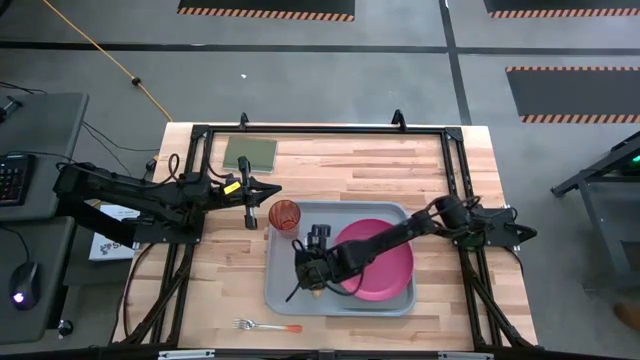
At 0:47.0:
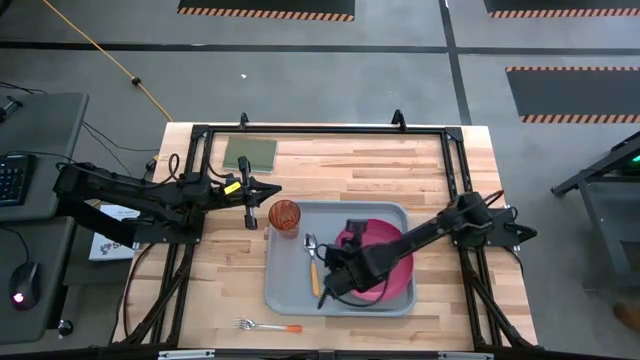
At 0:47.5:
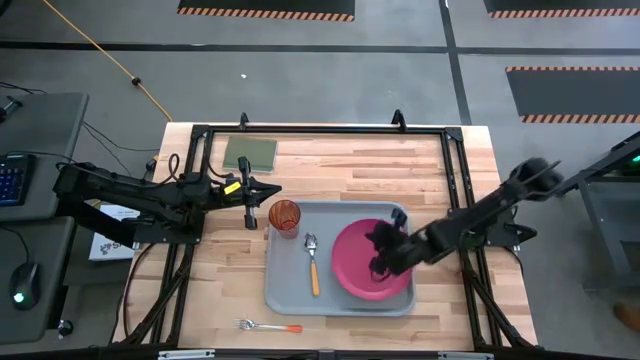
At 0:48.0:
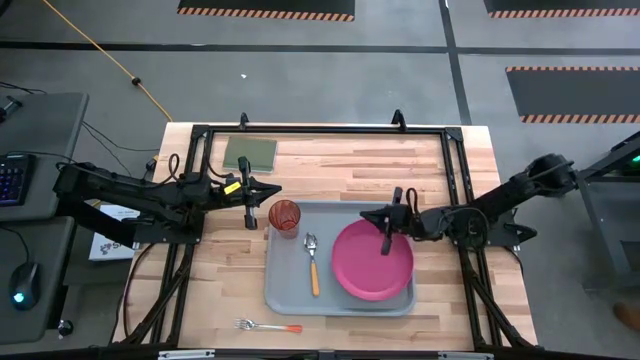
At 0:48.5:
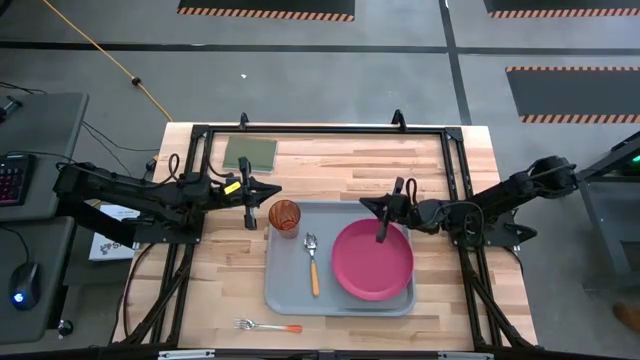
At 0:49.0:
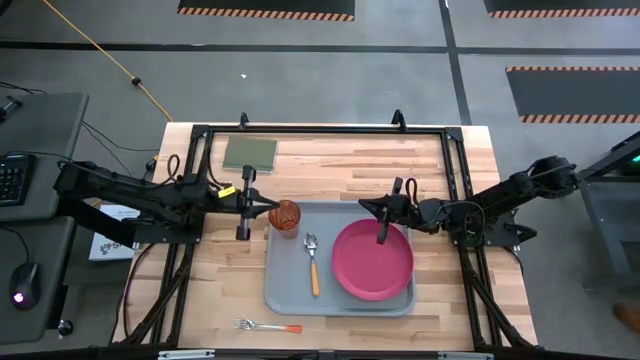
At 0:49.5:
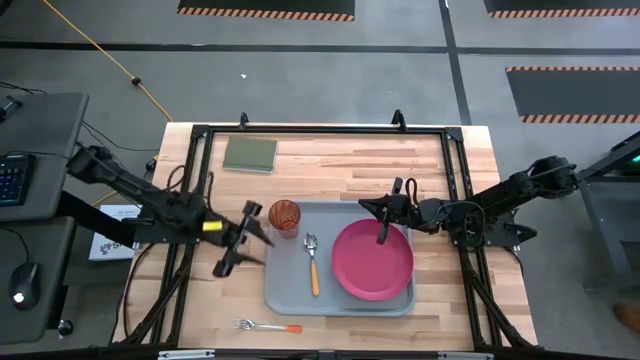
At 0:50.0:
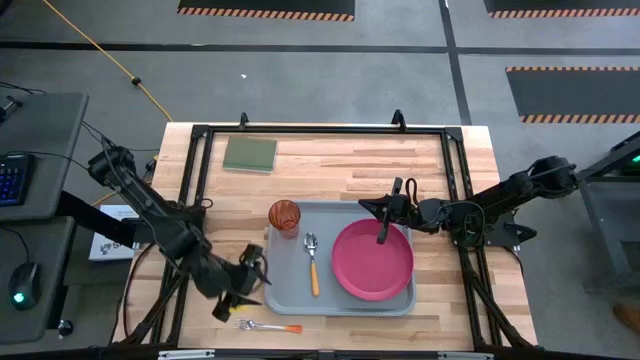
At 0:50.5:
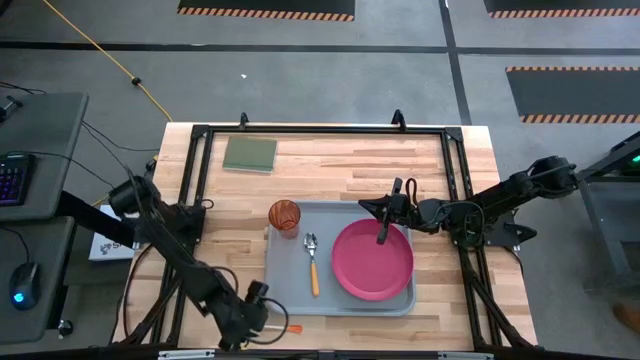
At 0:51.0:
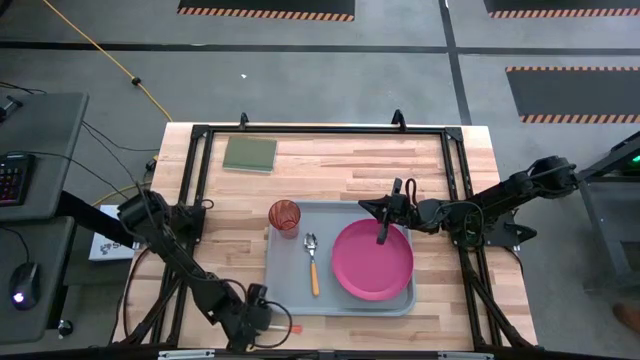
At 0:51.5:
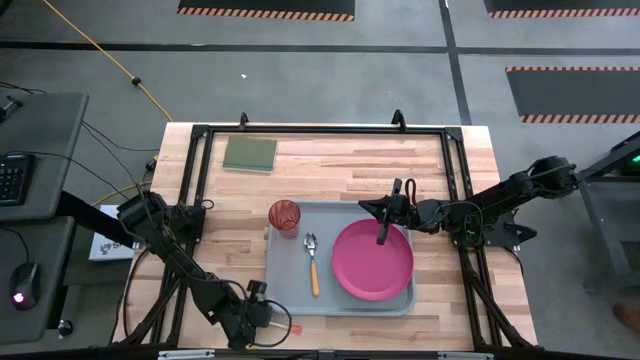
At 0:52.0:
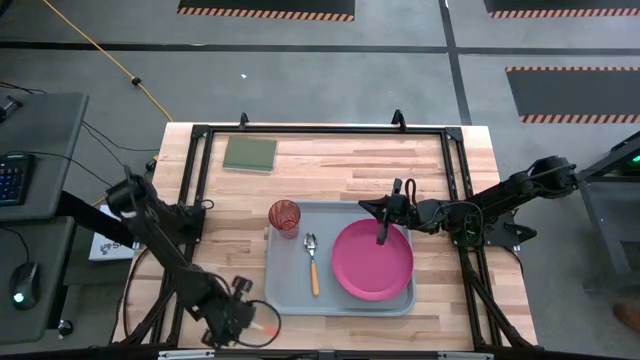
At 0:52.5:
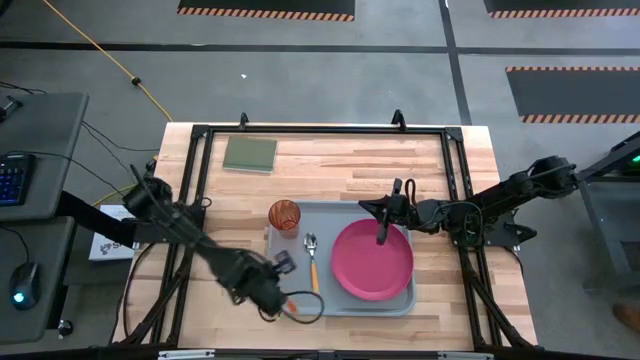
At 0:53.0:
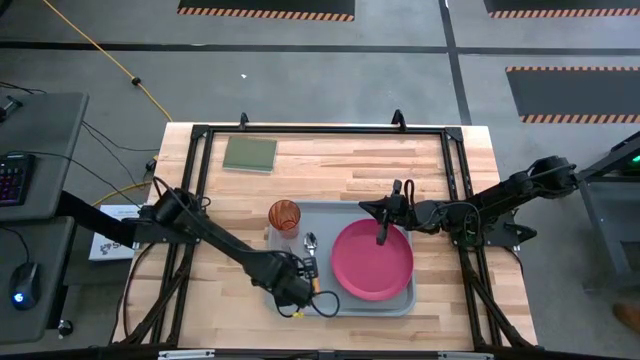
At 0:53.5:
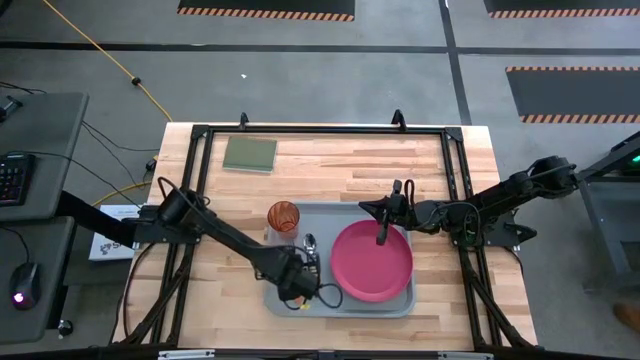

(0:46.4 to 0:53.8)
Task: Pick and place plate/cup/fork/spoon on tray
Put the white and orange fork to the left side of the orange spoon on the gray tray

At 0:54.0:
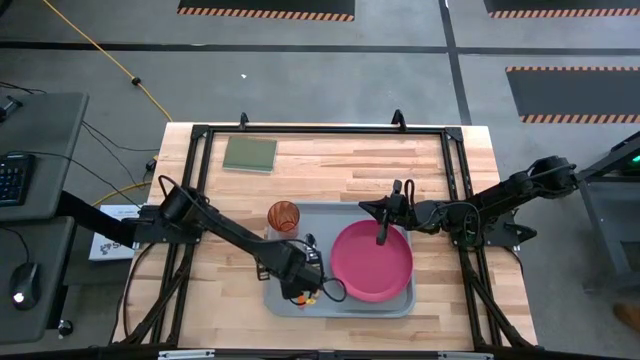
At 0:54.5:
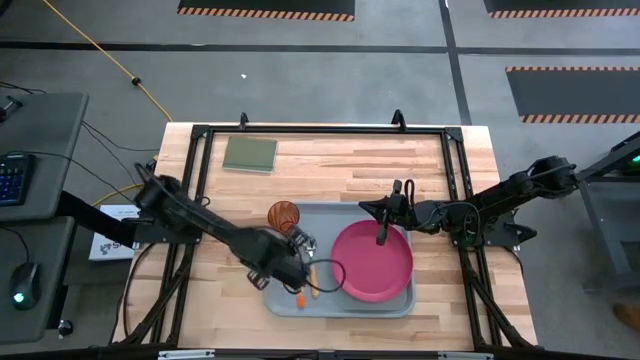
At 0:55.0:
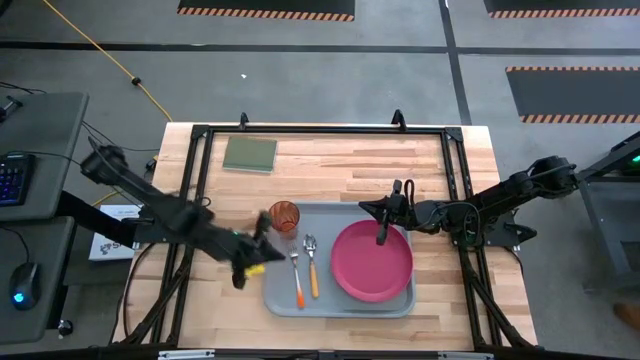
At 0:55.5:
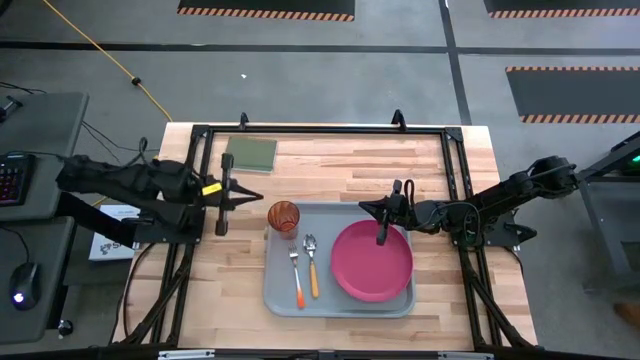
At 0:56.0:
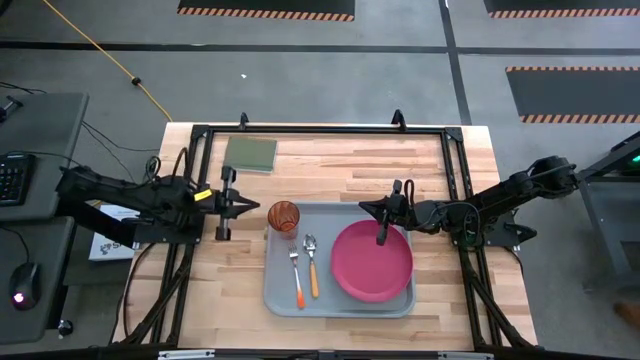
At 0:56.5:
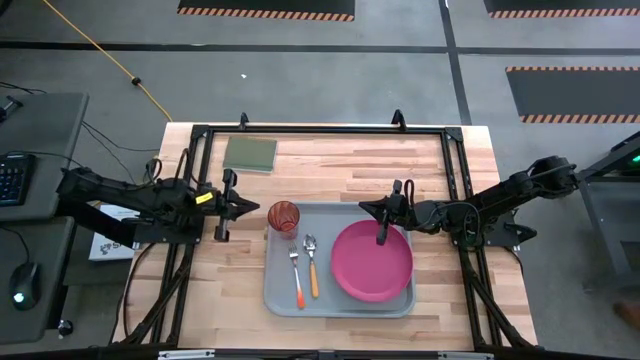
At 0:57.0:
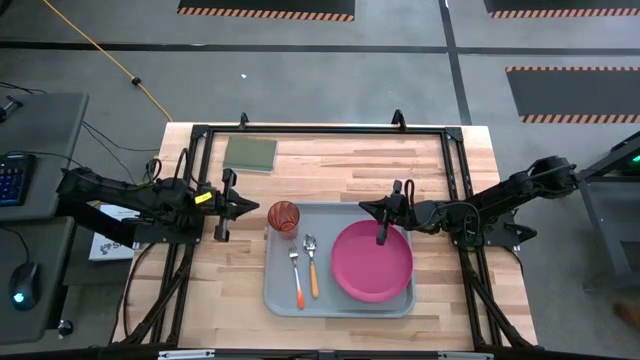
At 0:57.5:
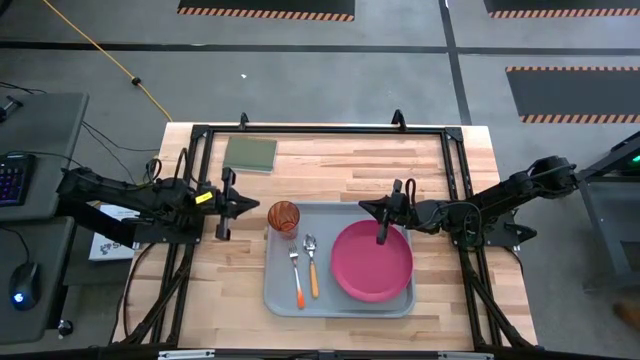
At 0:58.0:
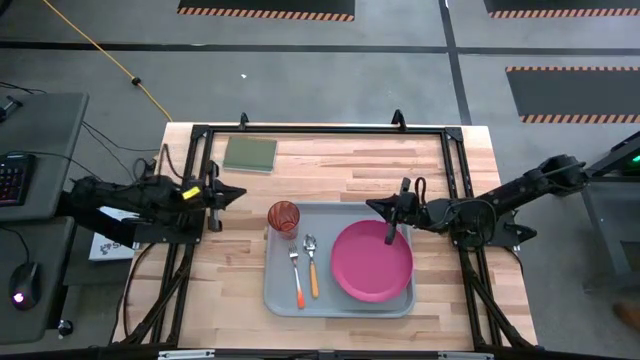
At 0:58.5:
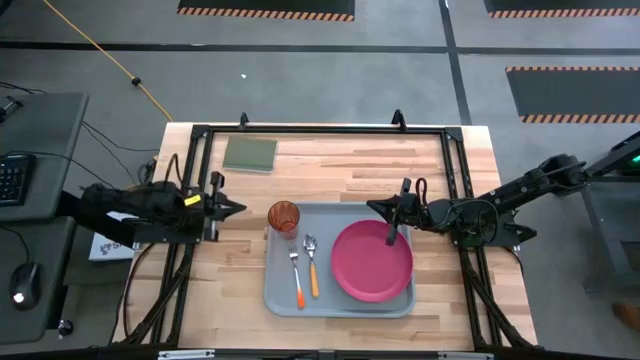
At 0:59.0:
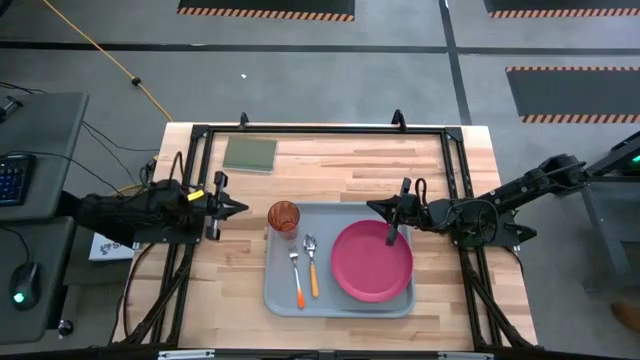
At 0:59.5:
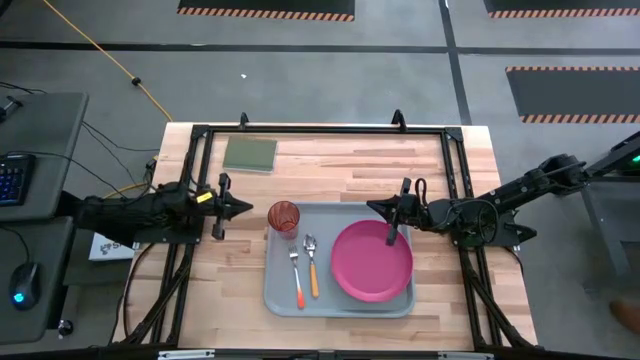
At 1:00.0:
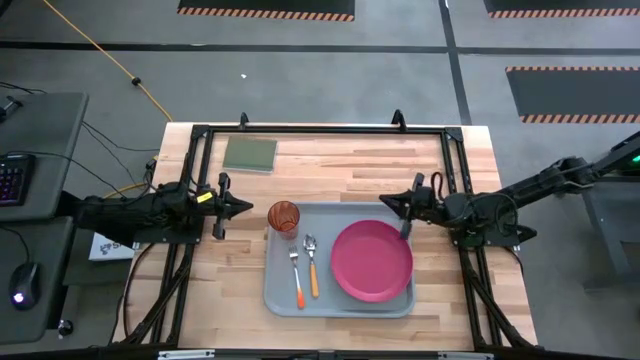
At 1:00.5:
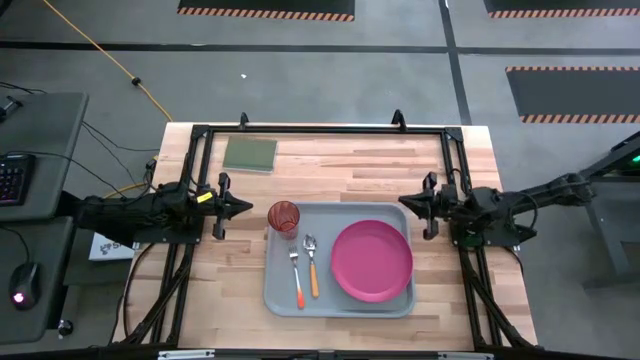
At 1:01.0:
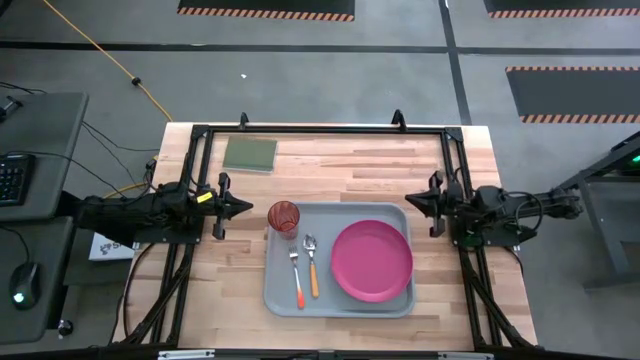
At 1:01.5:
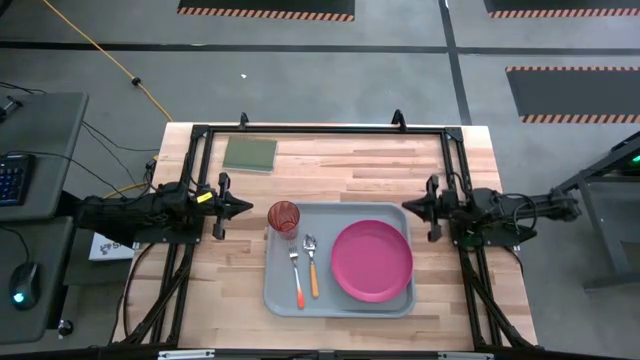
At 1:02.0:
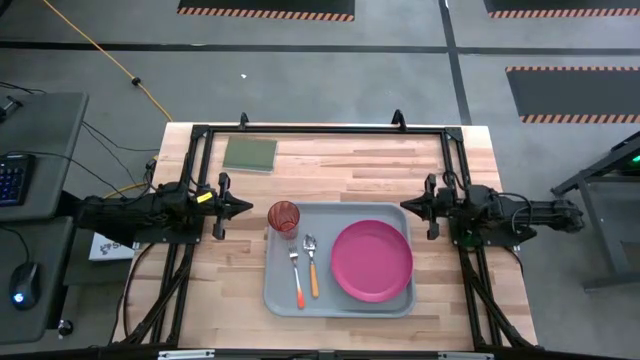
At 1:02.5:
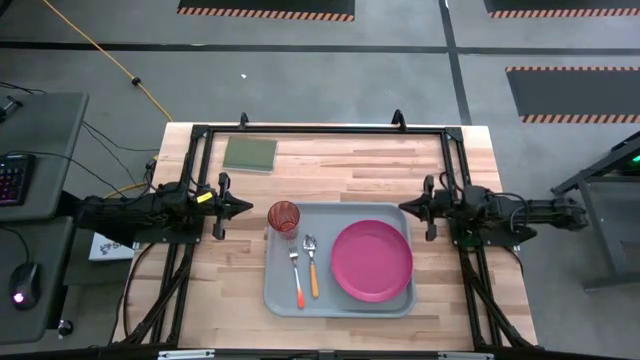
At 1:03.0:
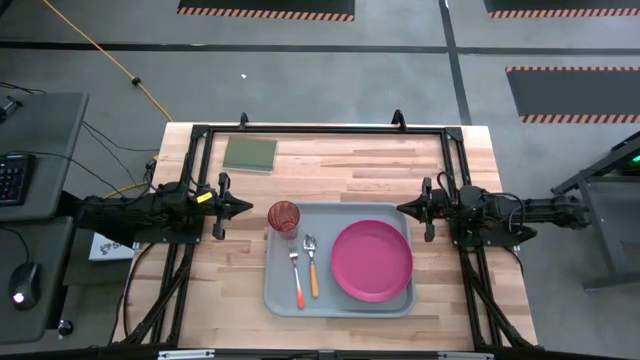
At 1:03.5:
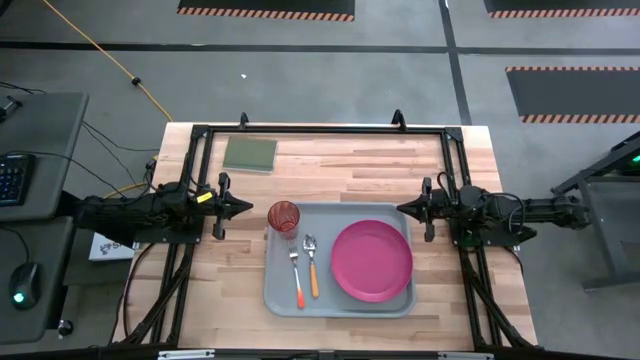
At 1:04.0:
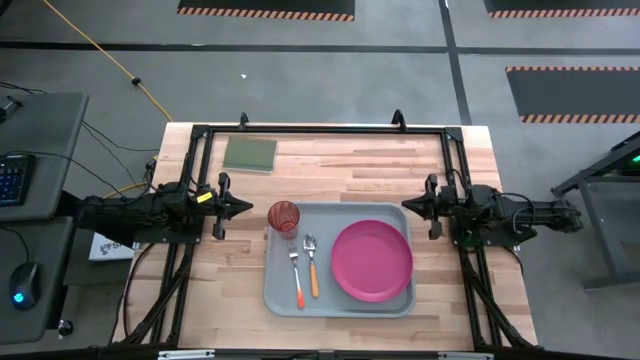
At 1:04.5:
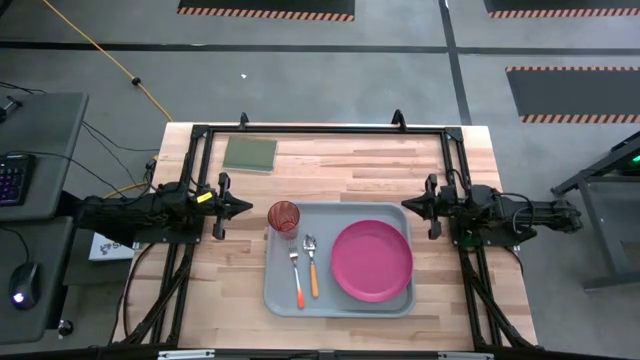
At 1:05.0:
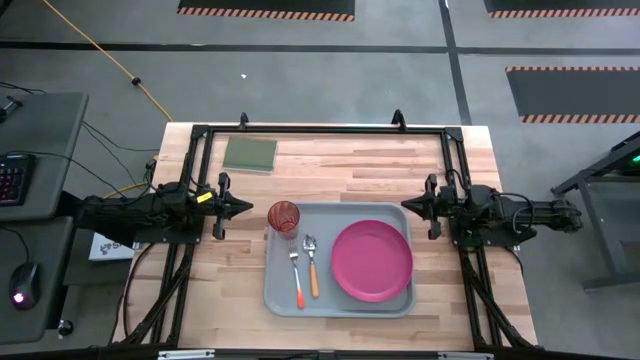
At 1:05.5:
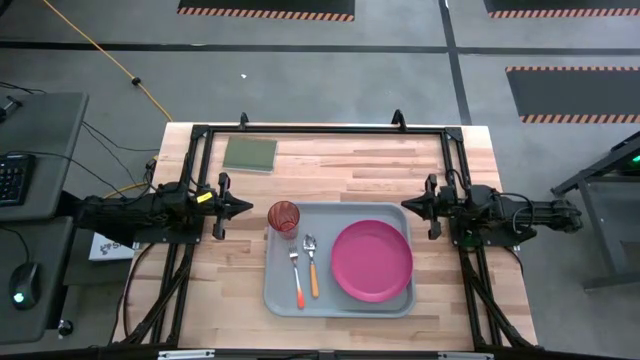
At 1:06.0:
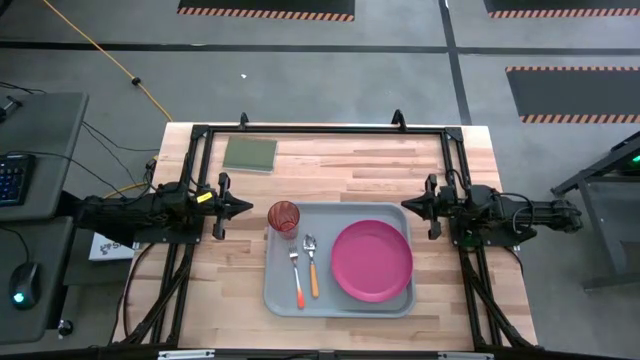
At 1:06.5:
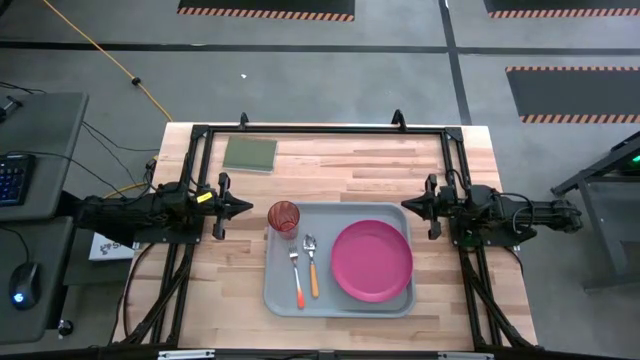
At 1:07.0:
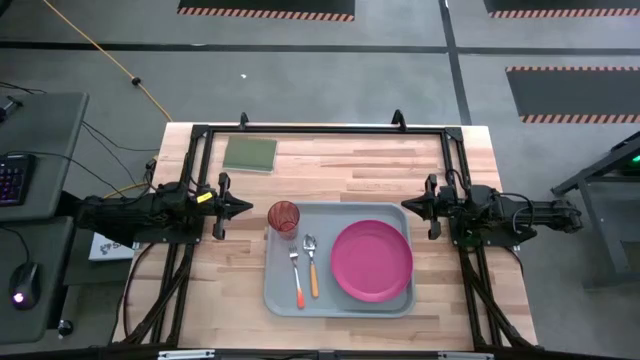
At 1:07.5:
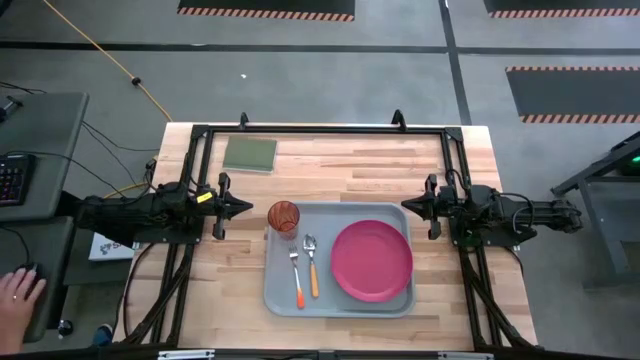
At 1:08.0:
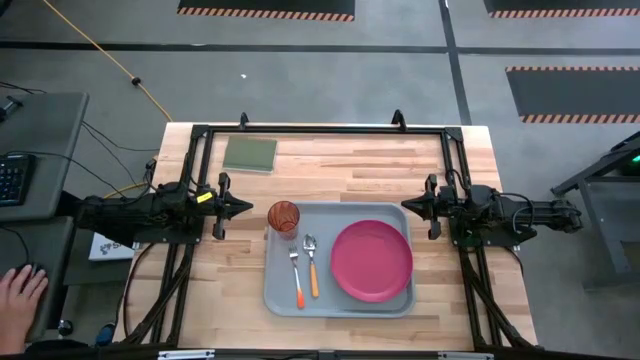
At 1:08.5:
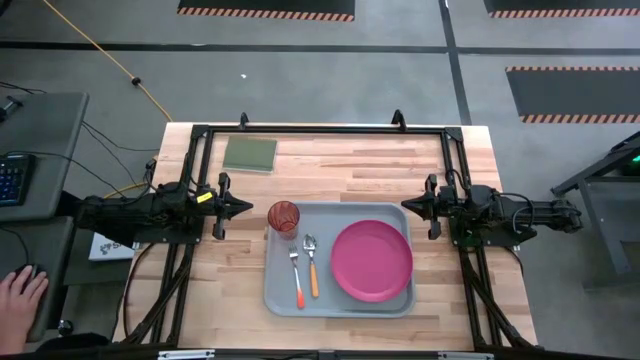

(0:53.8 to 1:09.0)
Return to Home Position
